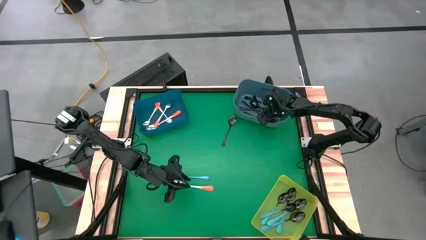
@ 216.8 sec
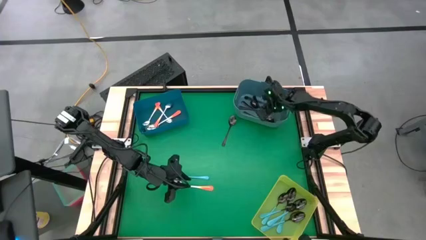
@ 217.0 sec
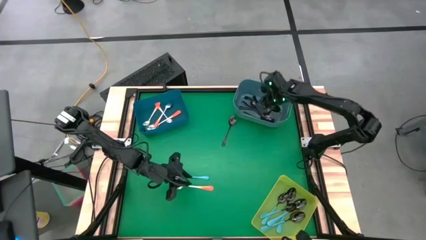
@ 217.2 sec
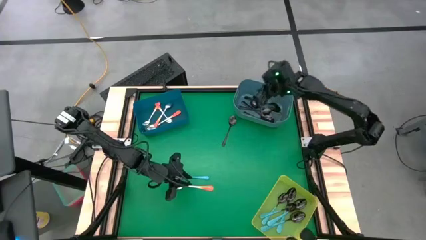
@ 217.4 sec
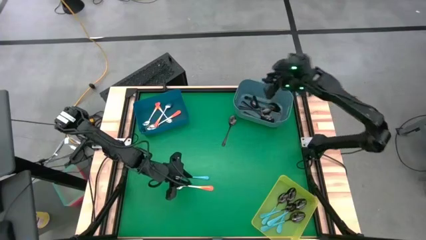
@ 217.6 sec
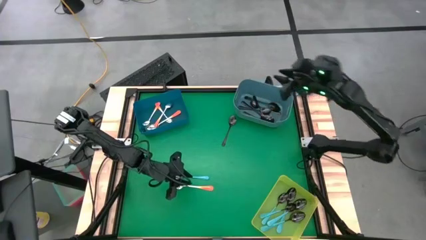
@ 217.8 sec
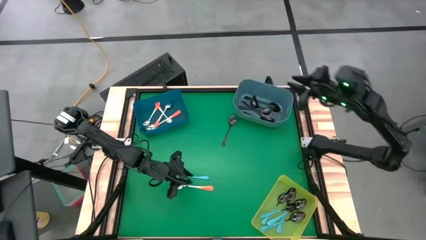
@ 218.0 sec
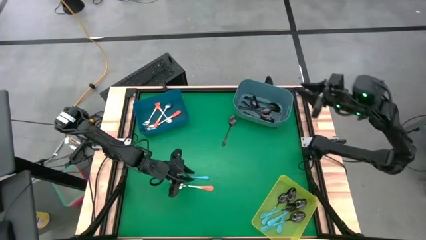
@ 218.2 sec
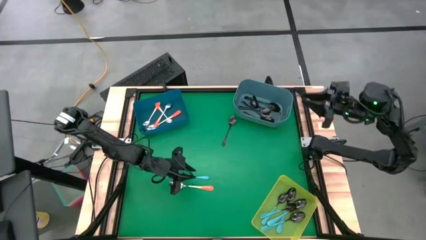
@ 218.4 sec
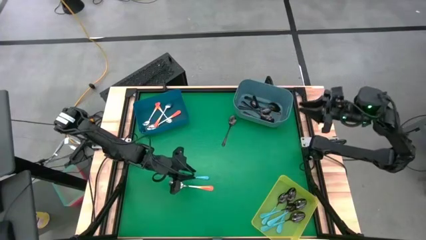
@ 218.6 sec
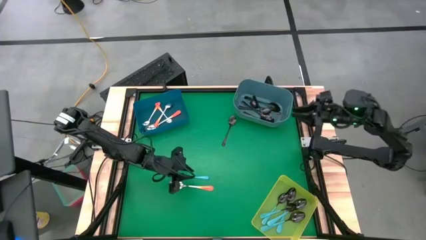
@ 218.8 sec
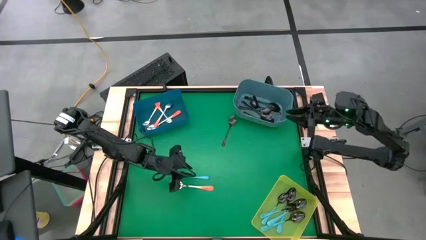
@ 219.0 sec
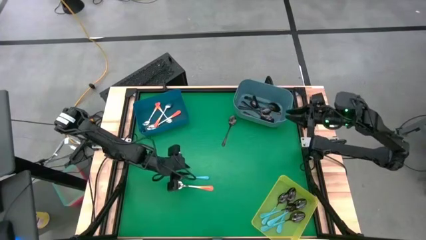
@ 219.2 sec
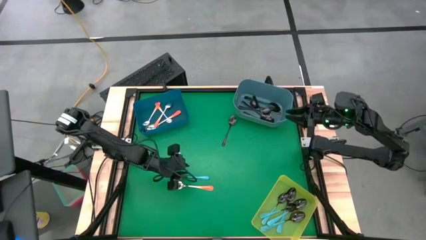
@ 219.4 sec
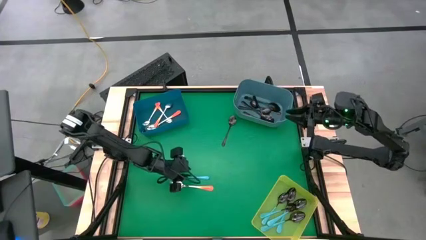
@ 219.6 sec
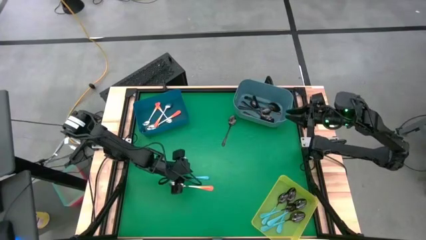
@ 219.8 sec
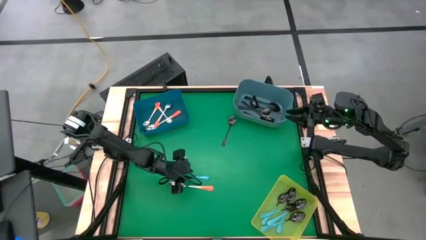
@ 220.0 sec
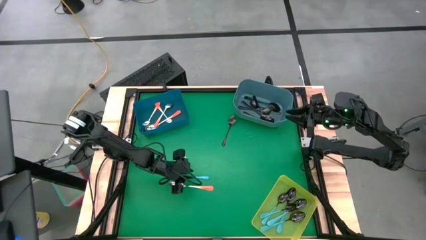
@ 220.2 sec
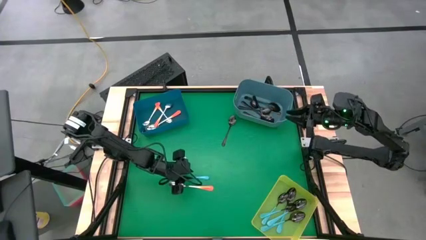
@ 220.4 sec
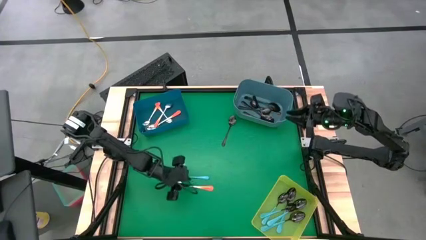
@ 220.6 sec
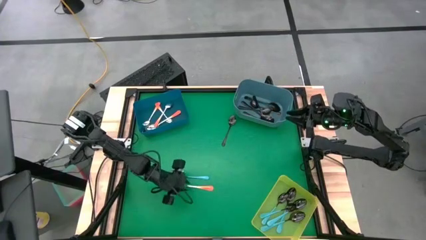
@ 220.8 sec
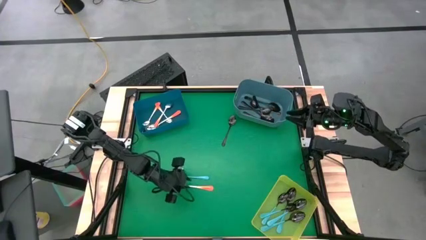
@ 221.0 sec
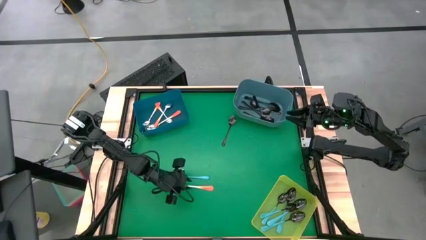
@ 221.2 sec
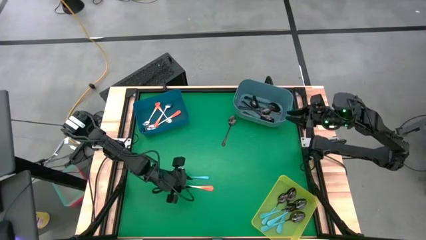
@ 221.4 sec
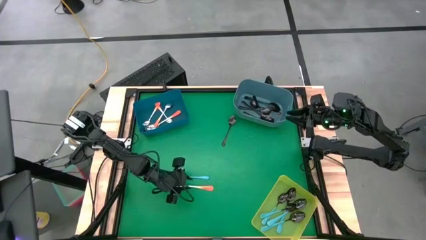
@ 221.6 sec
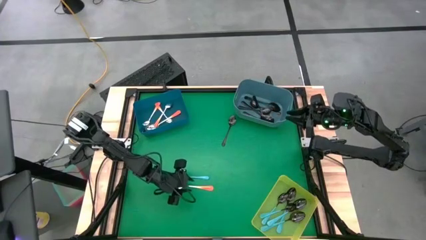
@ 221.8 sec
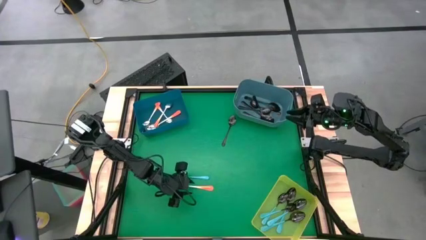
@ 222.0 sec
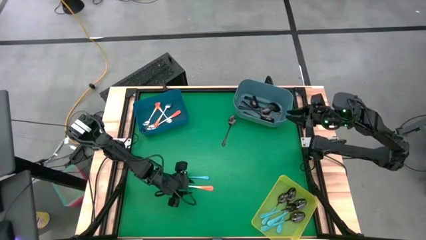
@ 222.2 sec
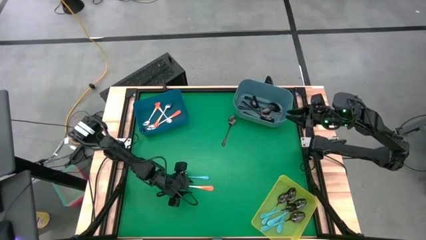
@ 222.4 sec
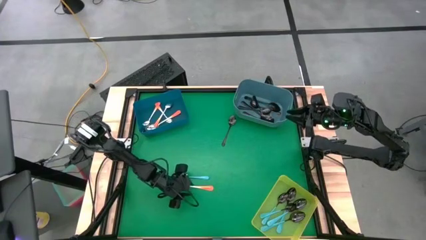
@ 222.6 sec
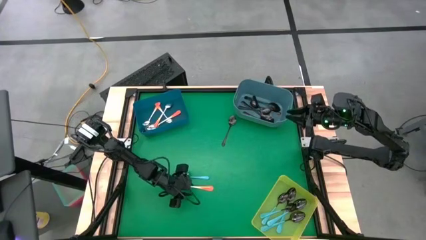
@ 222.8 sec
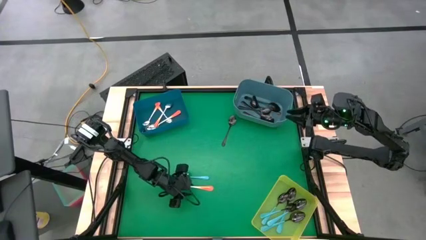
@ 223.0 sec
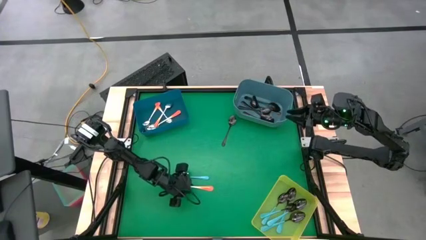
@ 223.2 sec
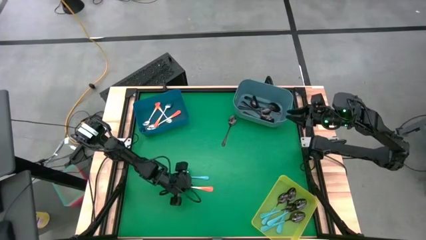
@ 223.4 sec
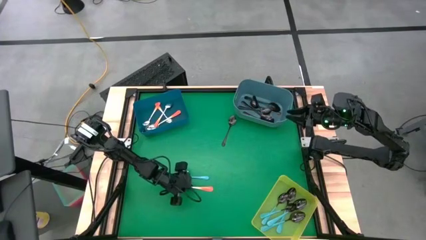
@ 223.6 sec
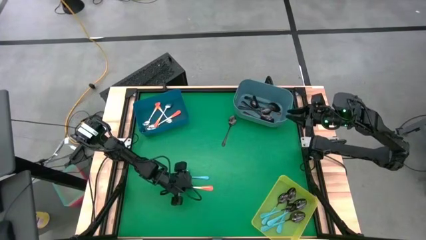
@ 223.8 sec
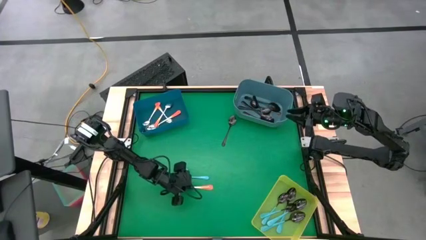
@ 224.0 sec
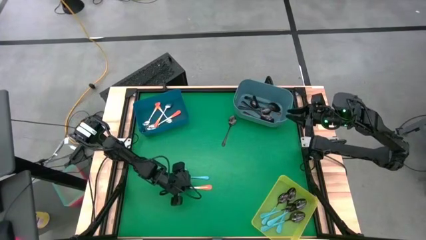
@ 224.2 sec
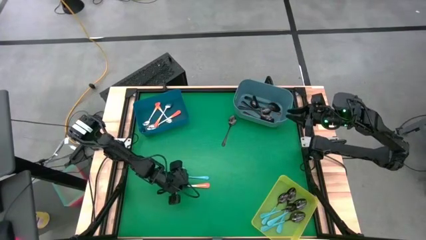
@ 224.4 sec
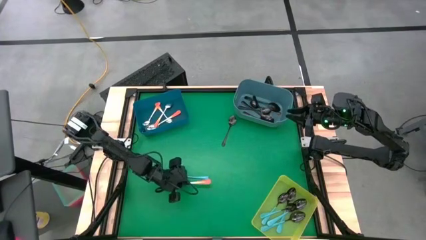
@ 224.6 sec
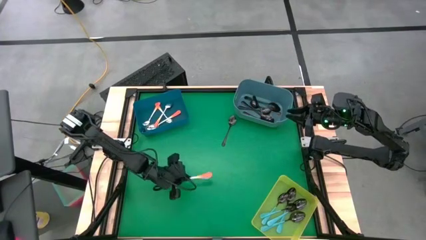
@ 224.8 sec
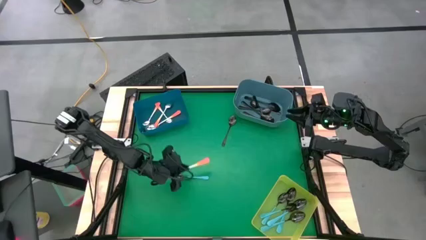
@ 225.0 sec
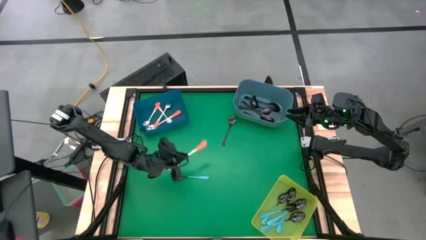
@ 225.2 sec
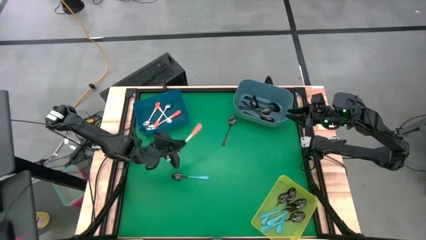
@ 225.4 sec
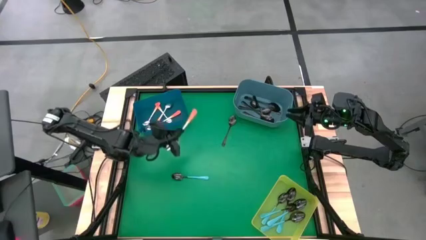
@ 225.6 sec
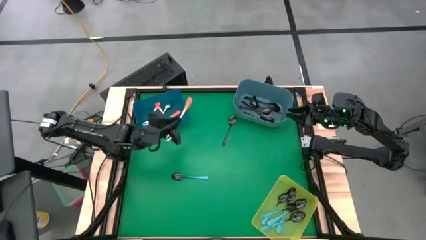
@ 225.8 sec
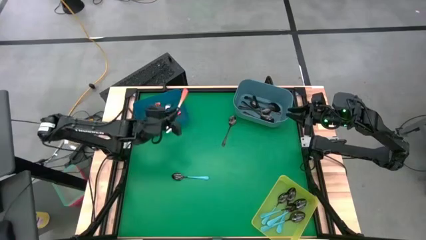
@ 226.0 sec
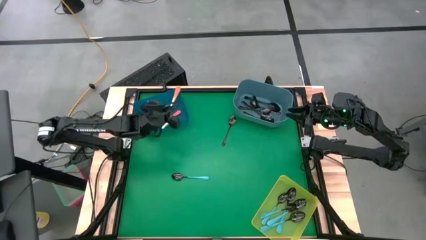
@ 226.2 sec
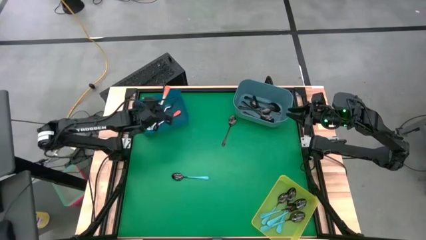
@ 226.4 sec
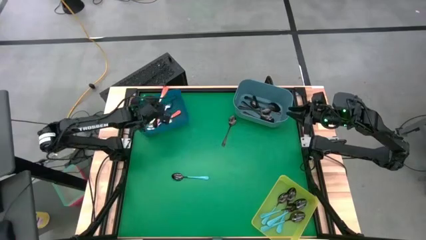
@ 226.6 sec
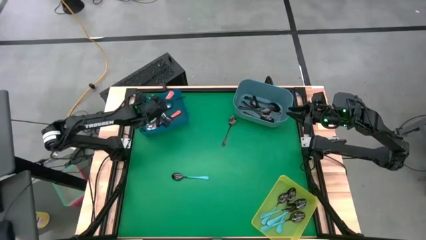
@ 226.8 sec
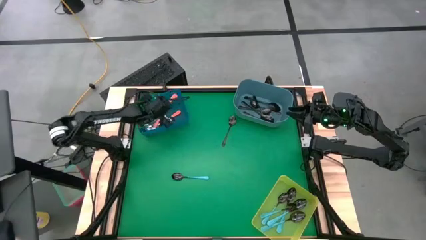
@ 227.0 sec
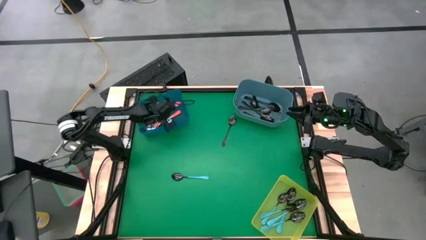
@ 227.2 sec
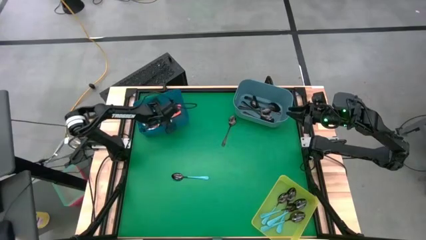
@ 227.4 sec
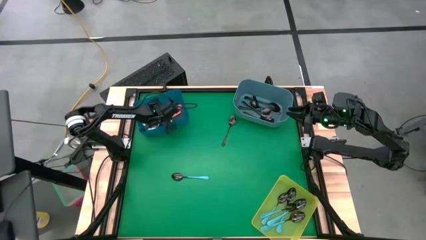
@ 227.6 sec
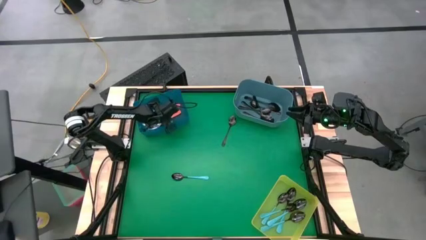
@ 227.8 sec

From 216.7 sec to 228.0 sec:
Task: Sort silverware by color (type)
Put the orange spoon into the dark blue bin
